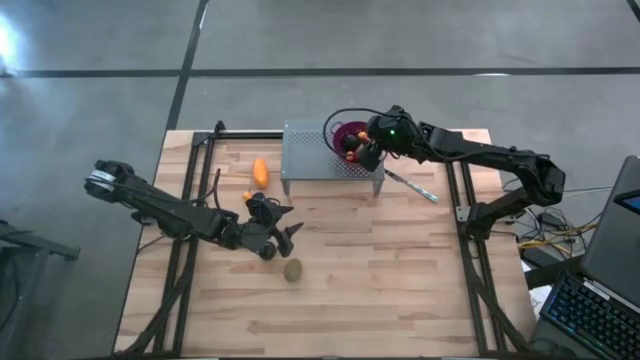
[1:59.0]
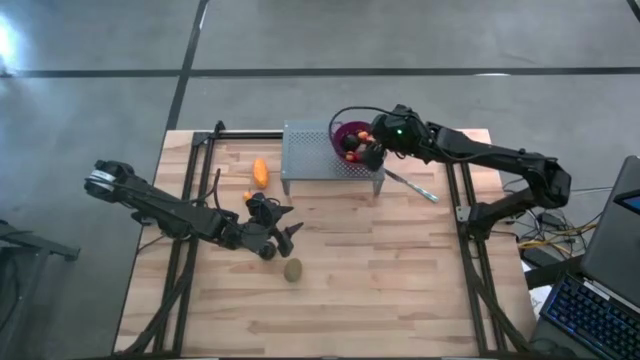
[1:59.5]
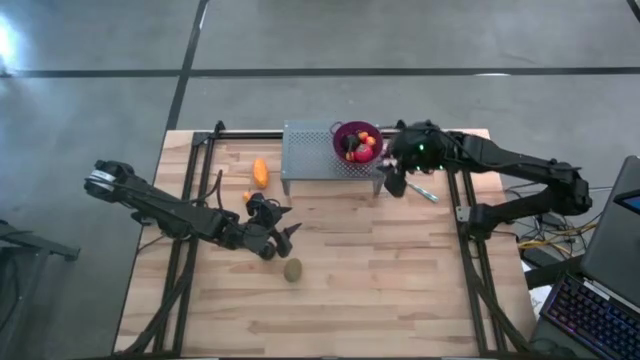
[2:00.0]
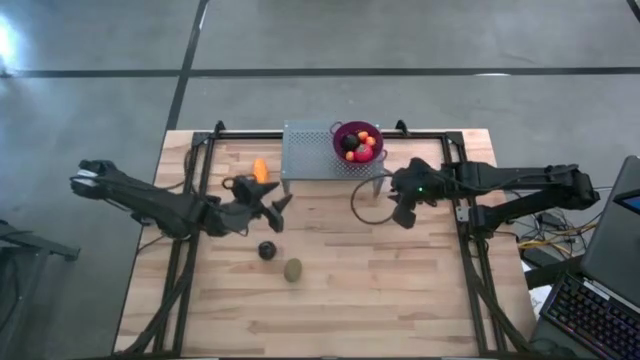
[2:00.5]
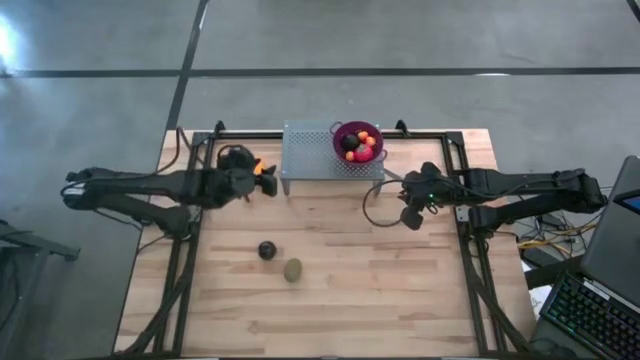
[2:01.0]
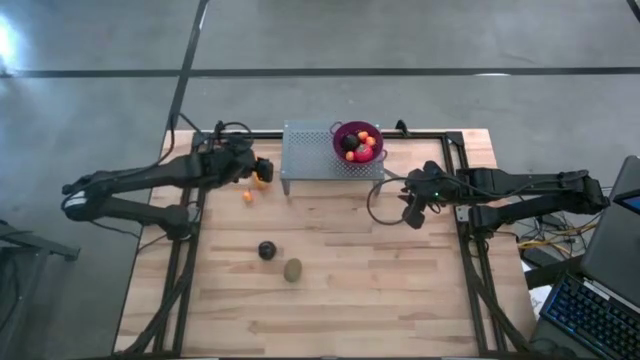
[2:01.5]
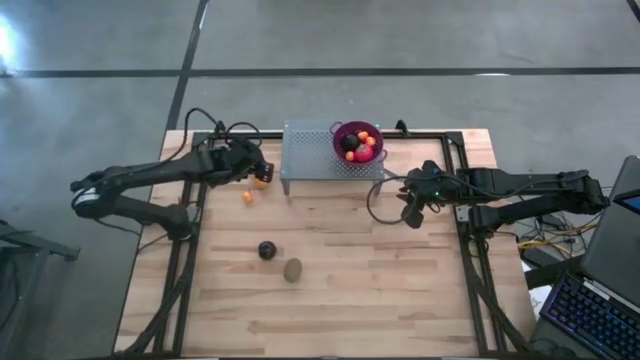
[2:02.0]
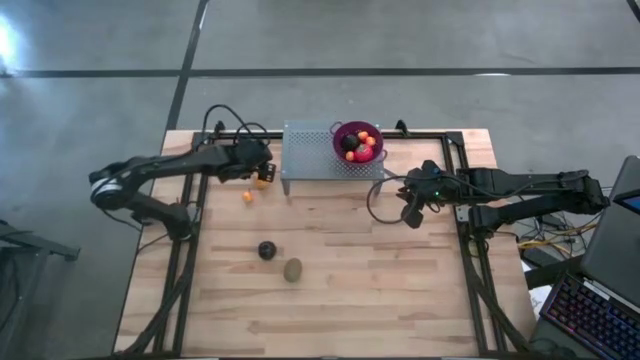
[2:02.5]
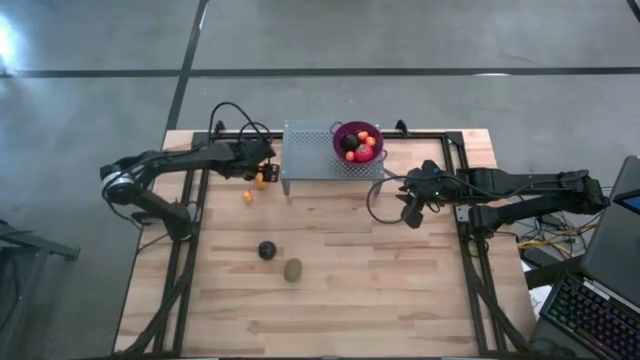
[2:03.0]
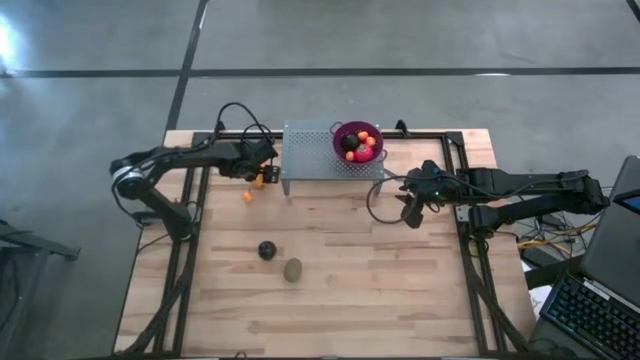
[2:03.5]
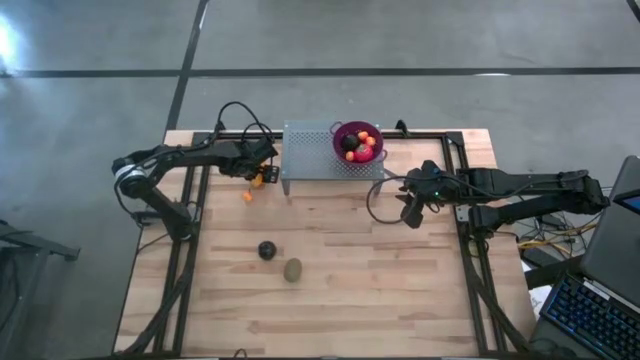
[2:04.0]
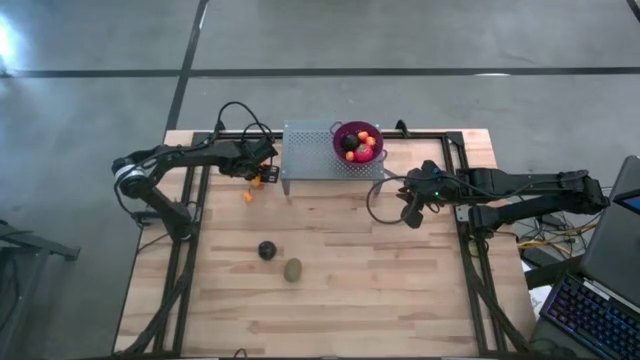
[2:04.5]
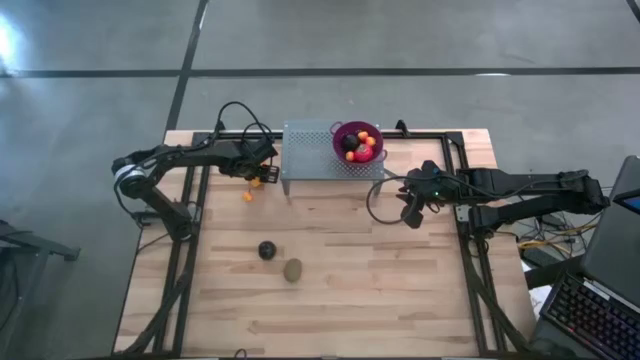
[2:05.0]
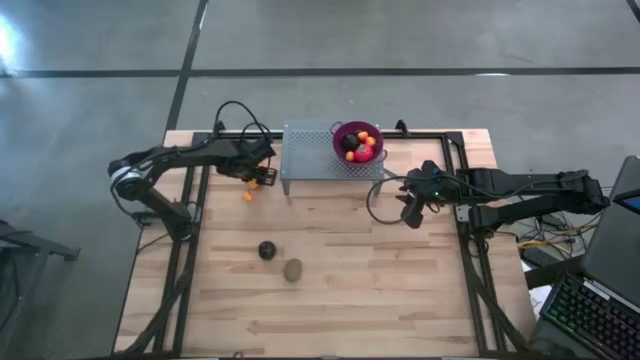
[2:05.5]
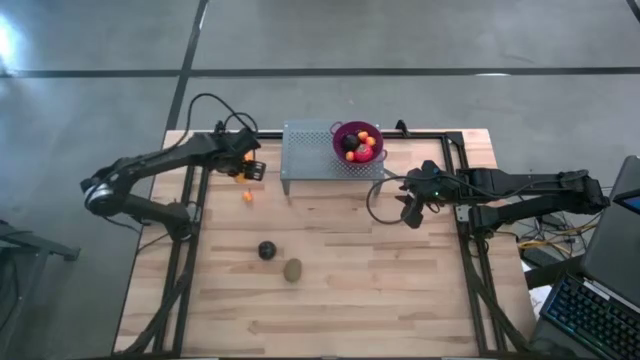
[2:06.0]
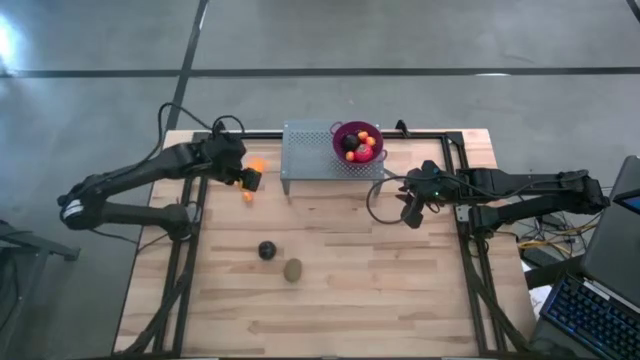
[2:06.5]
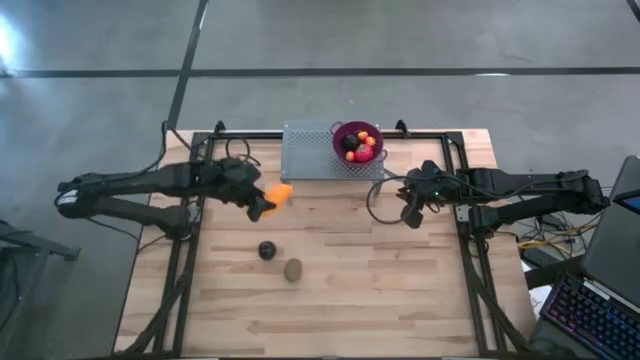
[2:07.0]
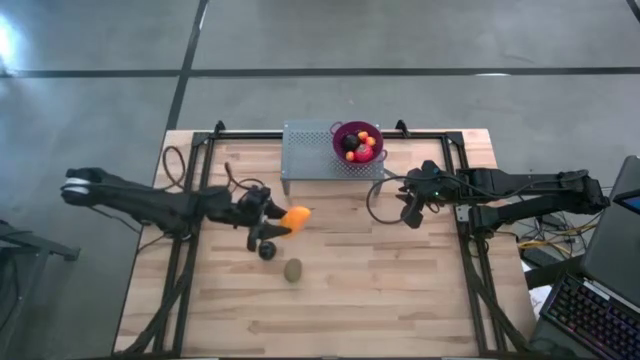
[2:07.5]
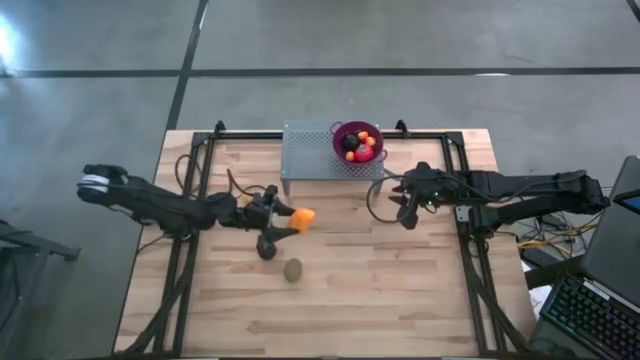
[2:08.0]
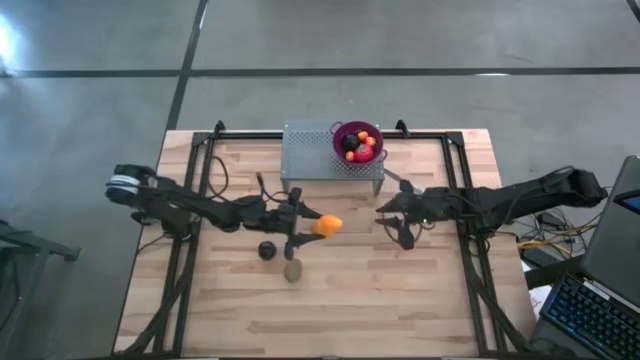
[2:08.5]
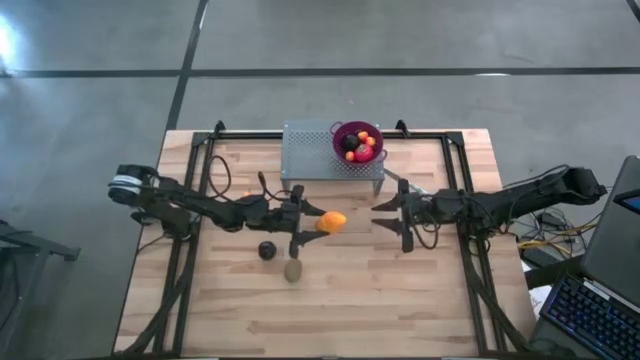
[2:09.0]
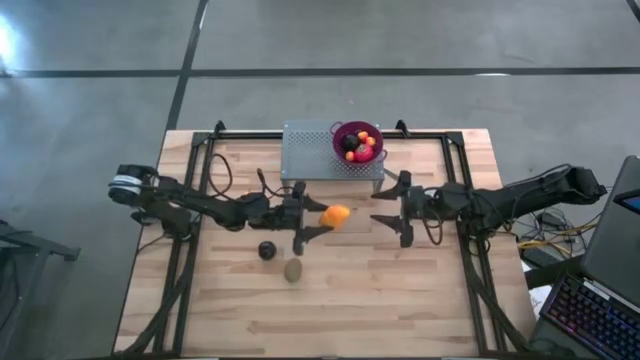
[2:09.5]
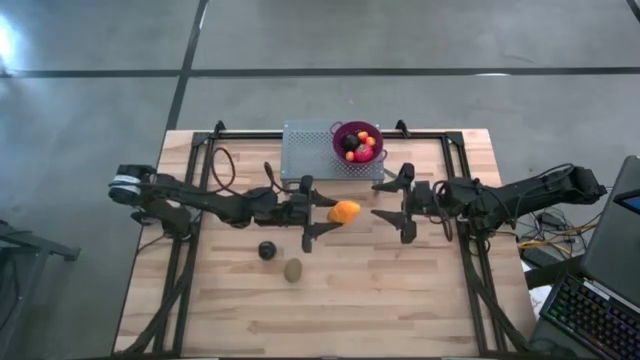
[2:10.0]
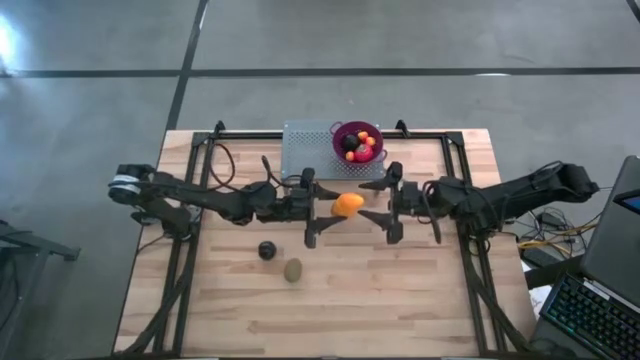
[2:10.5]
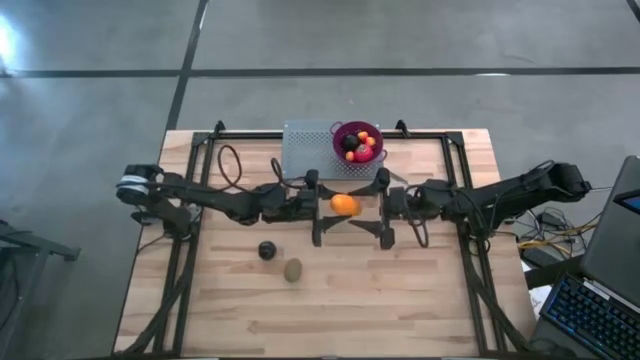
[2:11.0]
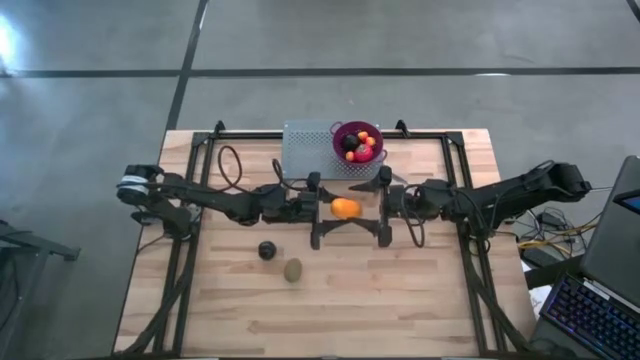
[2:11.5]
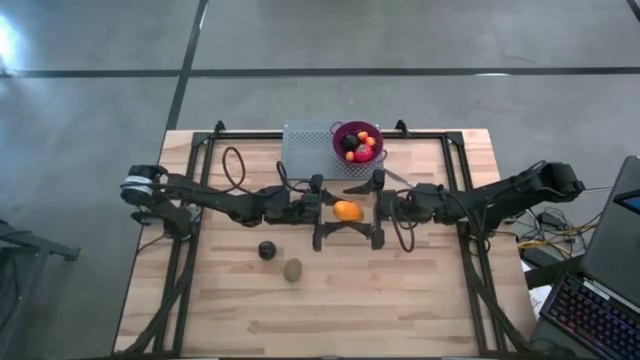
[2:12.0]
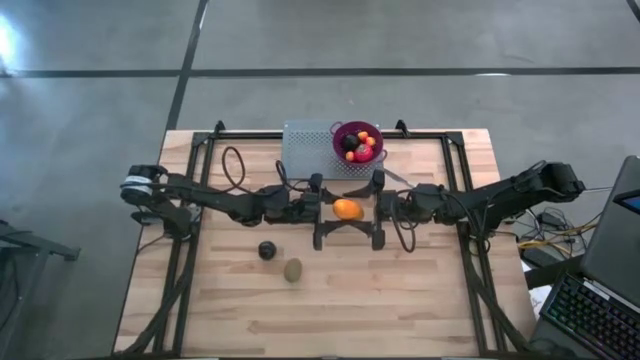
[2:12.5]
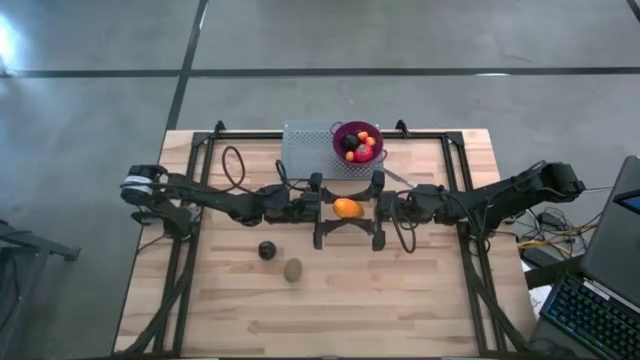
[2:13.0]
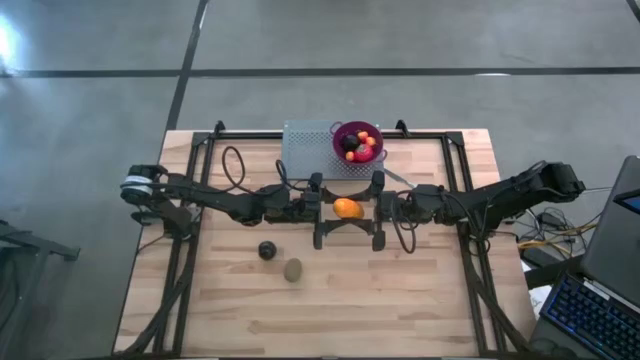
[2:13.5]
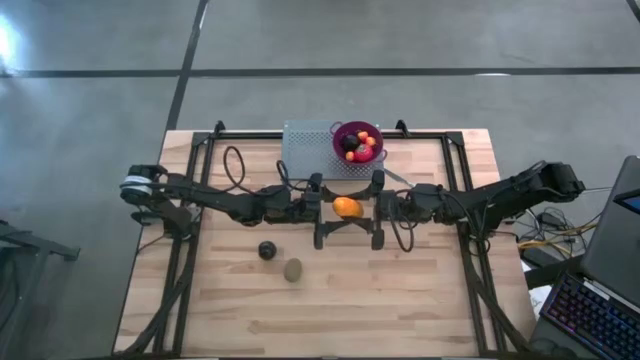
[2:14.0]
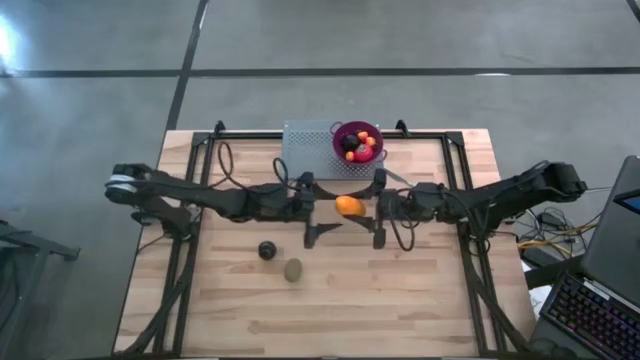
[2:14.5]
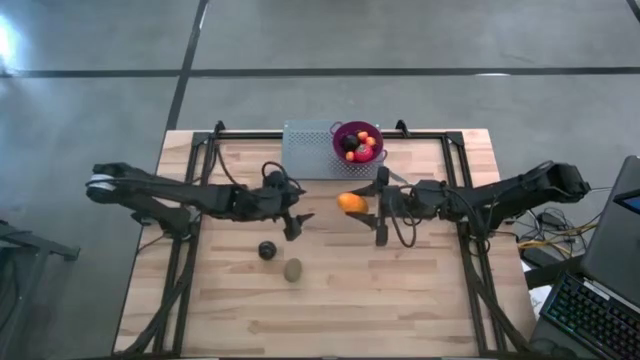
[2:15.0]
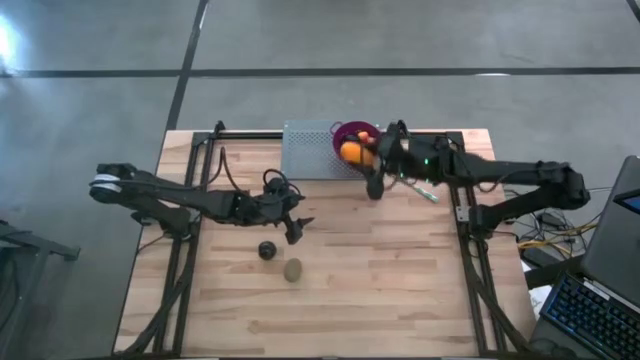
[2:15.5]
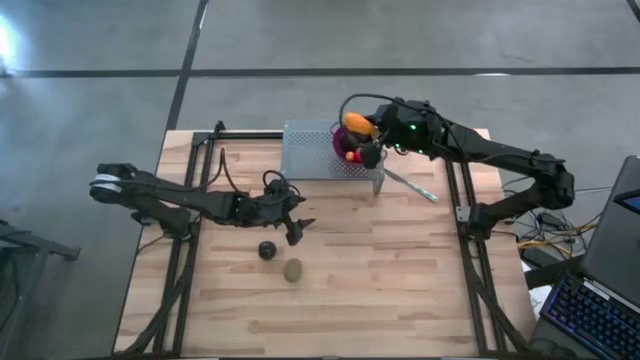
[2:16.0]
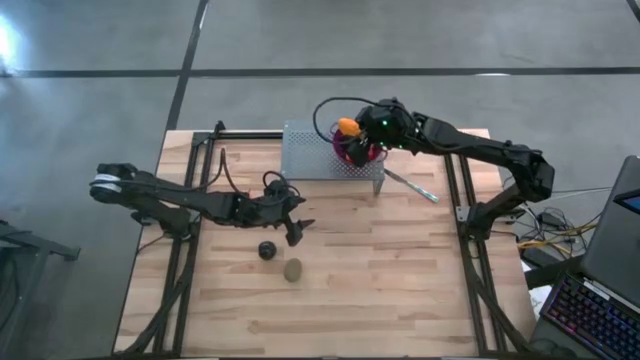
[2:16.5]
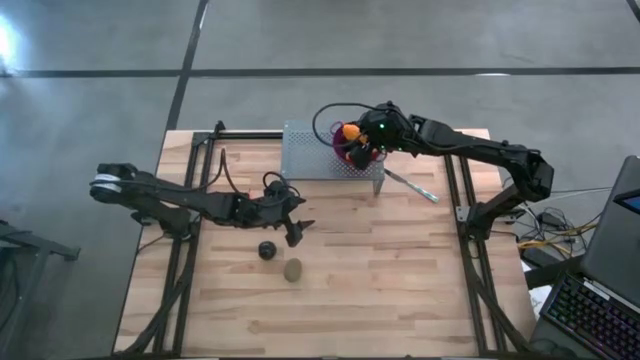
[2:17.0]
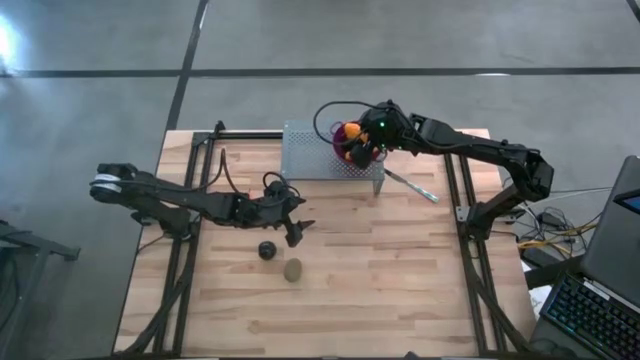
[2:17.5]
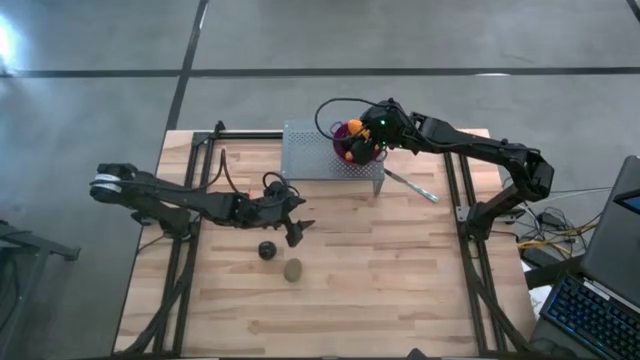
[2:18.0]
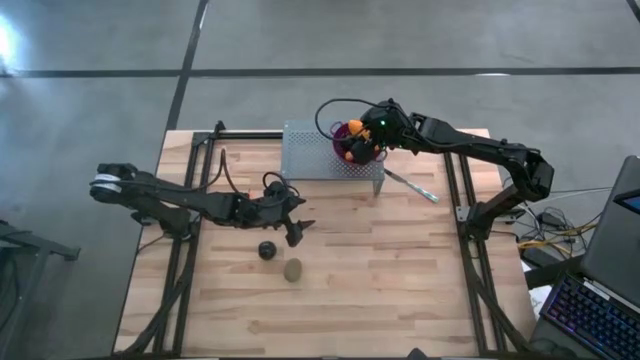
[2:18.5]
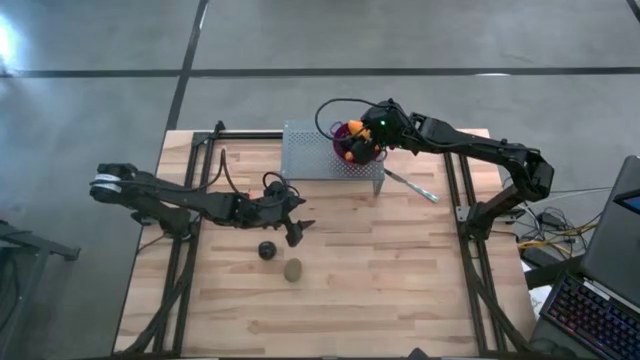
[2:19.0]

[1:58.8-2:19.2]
Task: Pick & Place Fruit
Put the mango into the purple strainer bowl on the shelf

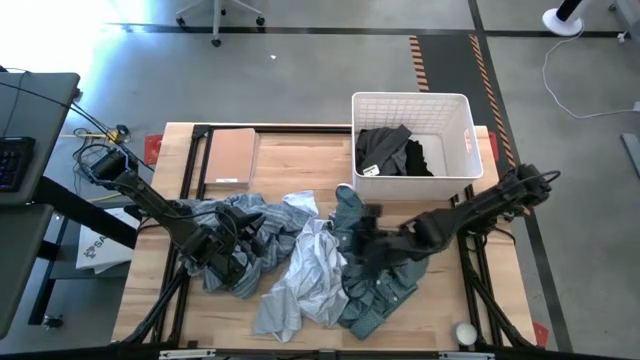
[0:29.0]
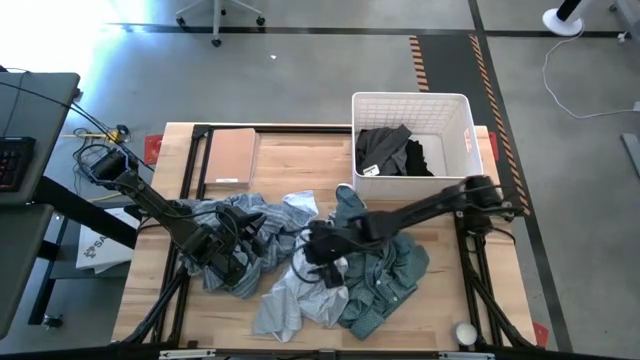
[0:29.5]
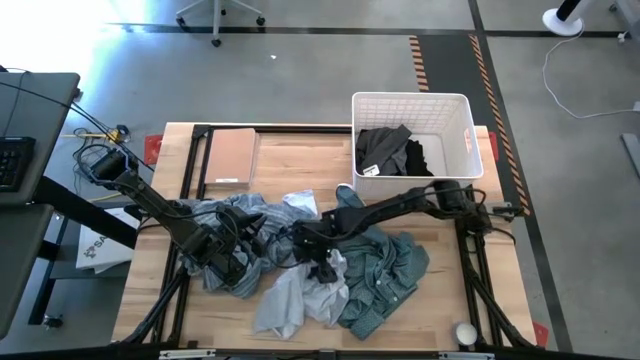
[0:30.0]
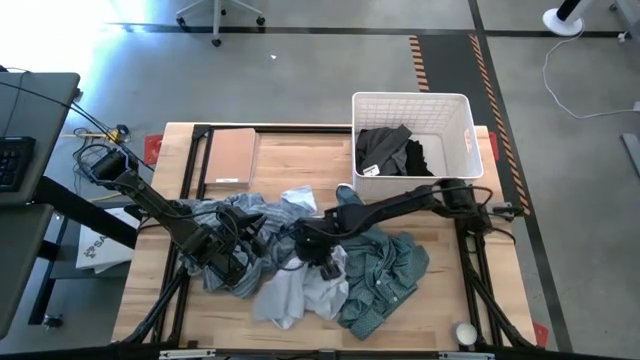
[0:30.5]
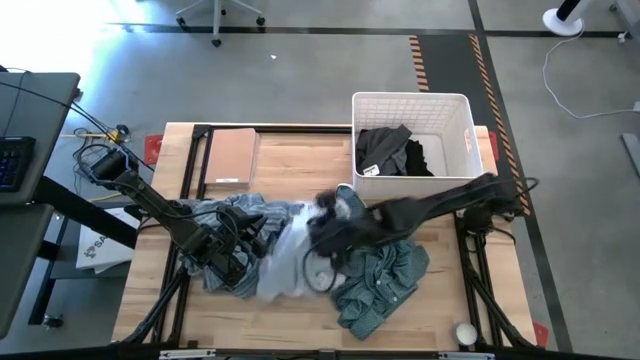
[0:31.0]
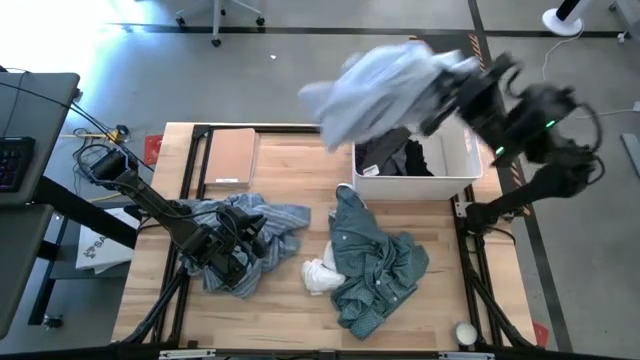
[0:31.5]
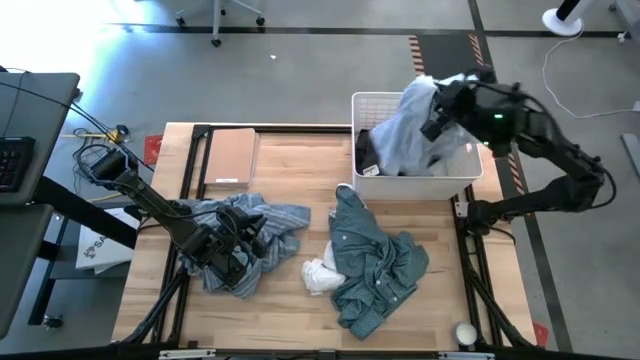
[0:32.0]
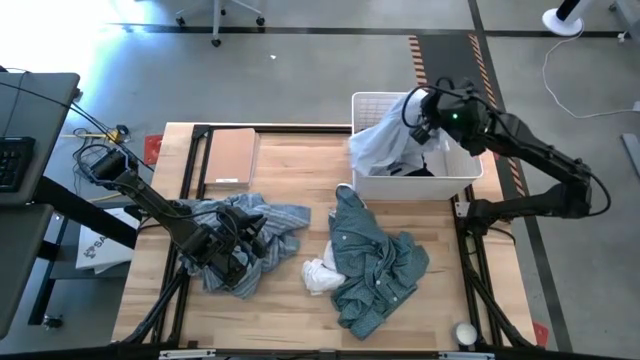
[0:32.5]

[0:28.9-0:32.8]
Task: Sort clothes
Put the white polo shirt into the white laundry bin
